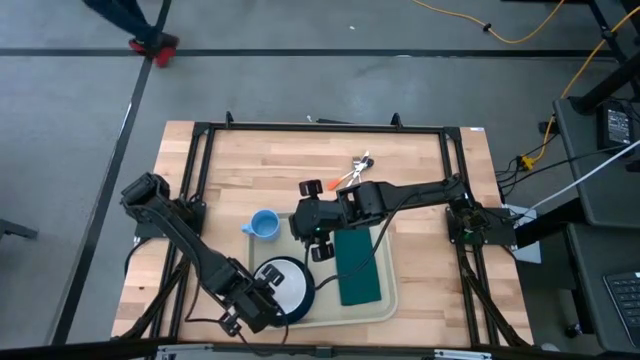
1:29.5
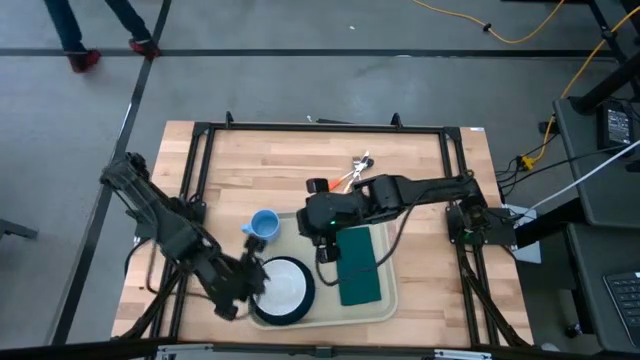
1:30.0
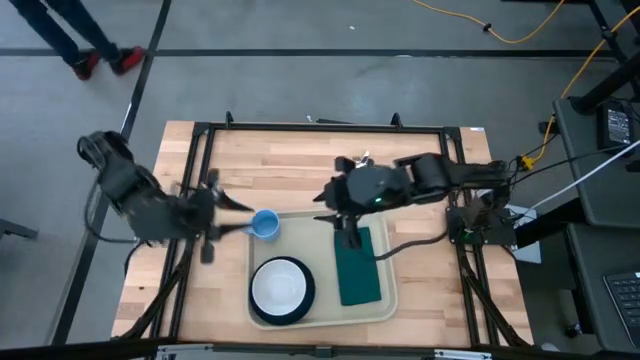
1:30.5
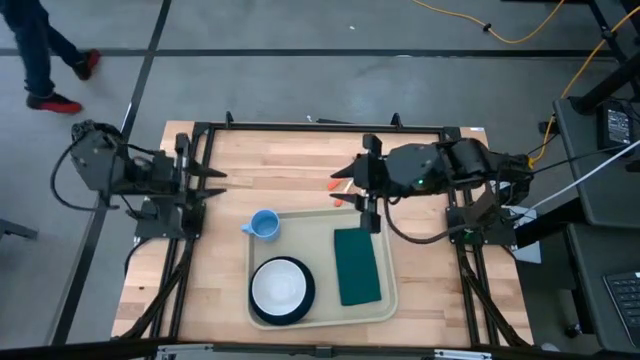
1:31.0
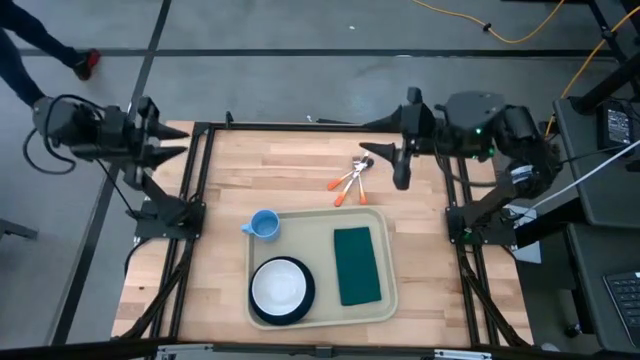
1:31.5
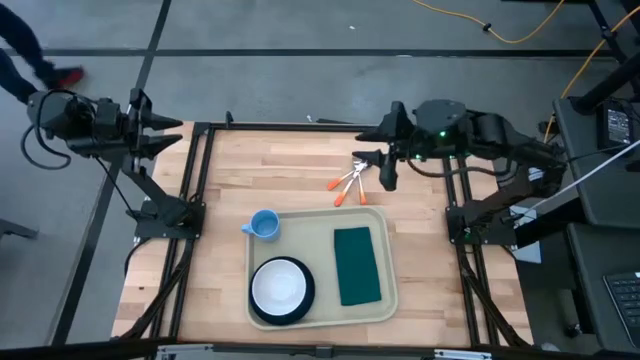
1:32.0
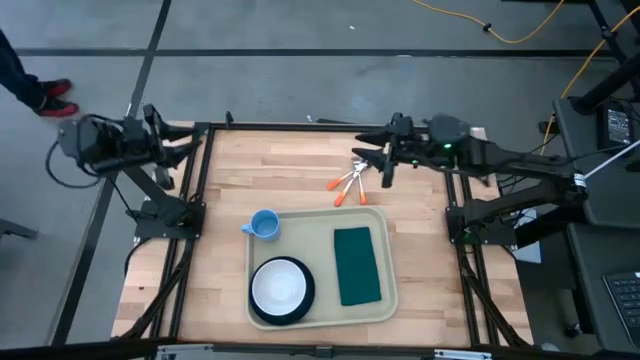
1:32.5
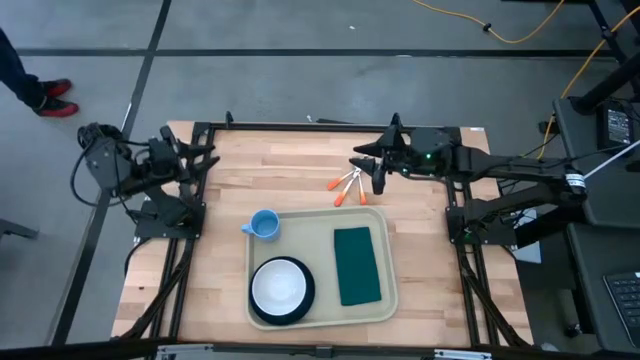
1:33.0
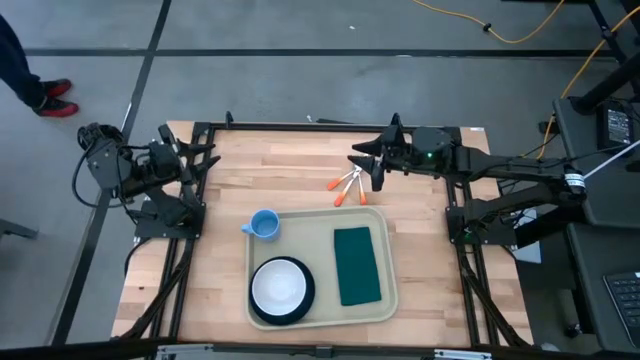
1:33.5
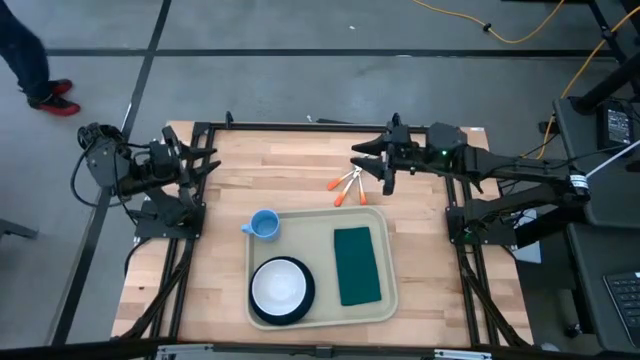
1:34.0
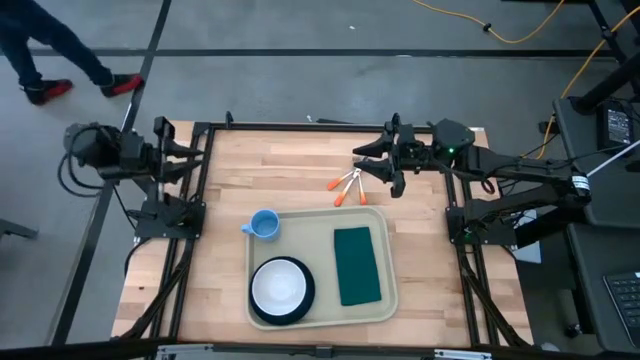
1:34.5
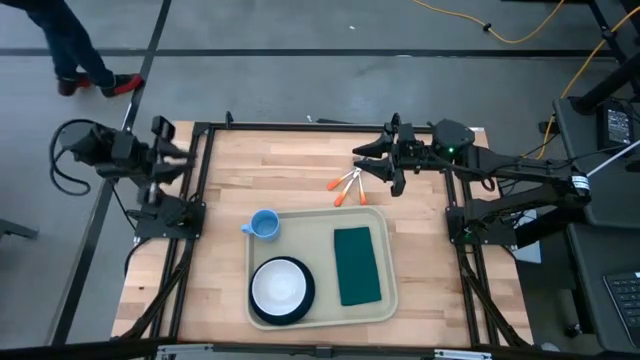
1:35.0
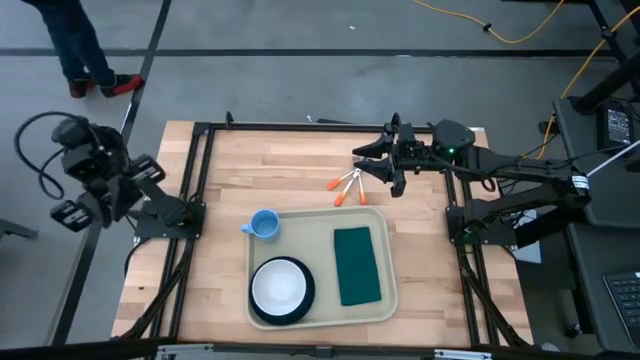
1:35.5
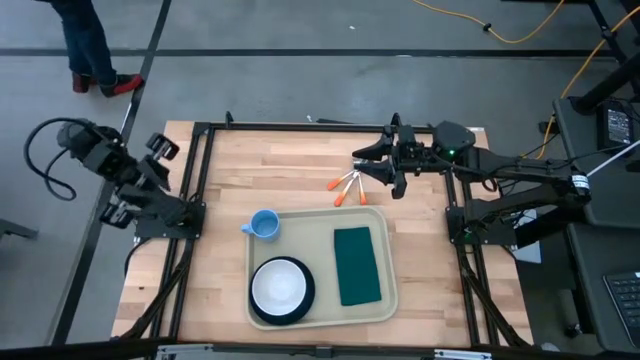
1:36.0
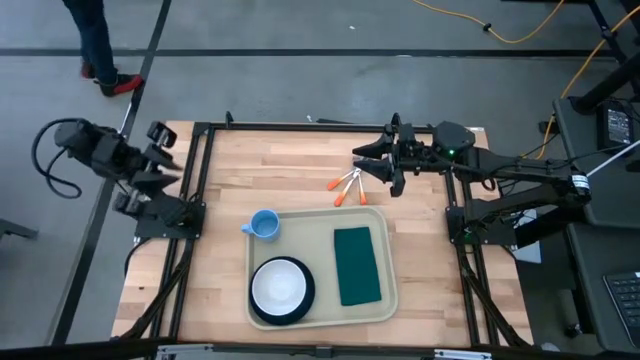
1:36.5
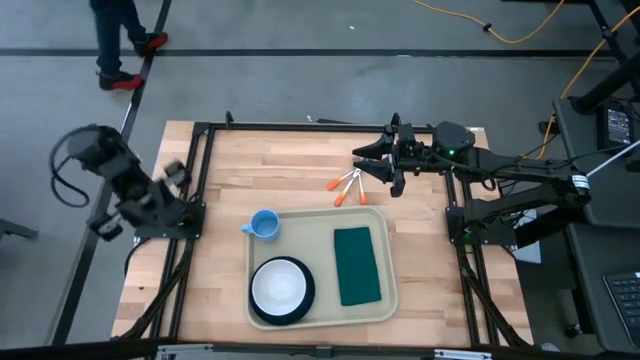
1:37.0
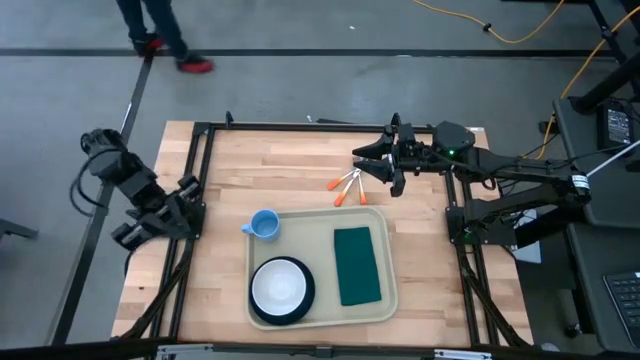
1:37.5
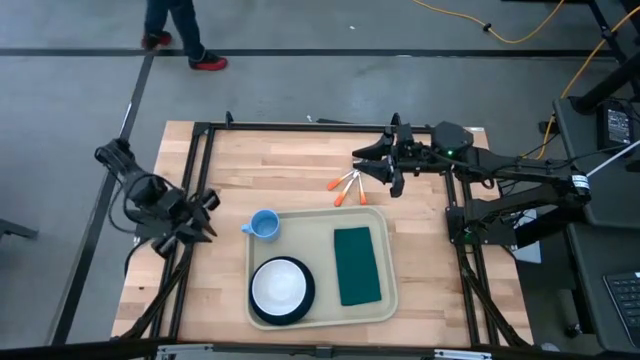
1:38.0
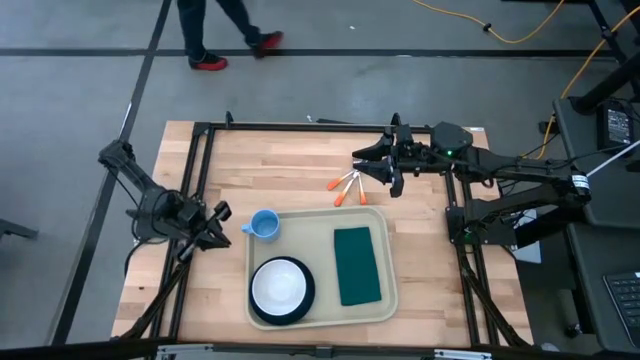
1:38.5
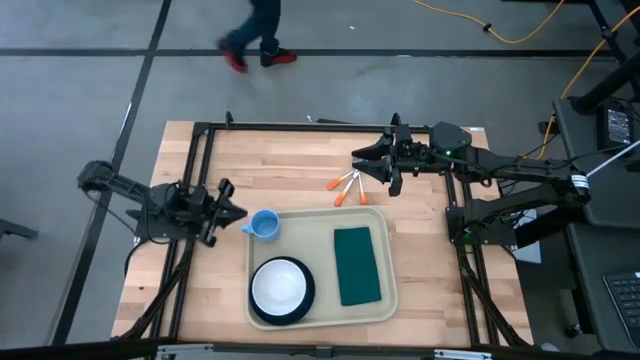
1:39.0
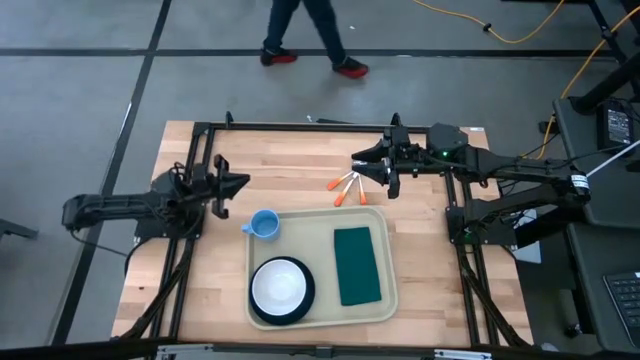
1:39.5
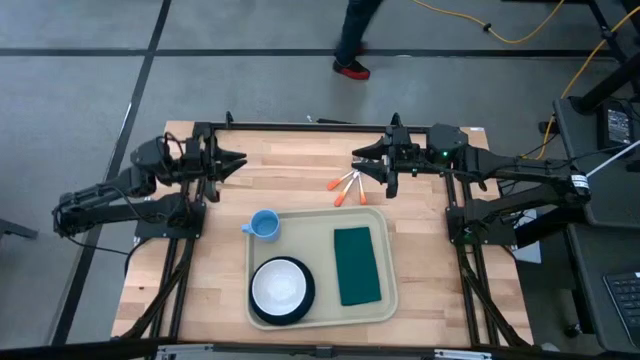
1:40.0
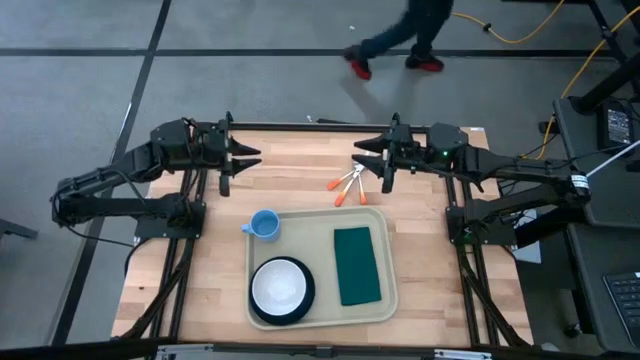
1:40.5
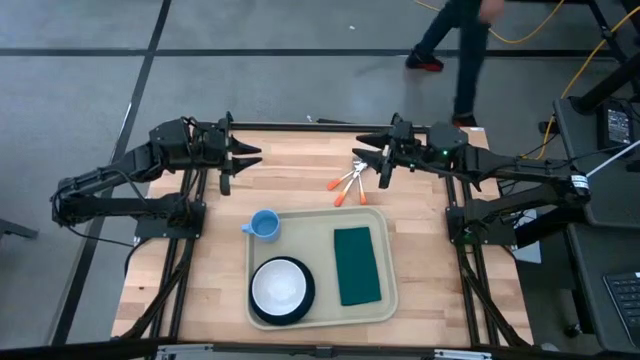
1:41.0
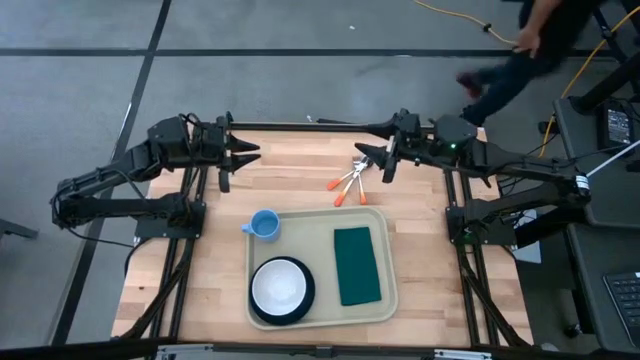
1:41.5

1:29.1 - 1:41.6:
Task: Set up tray
Put the orange knife on top of the green napkin

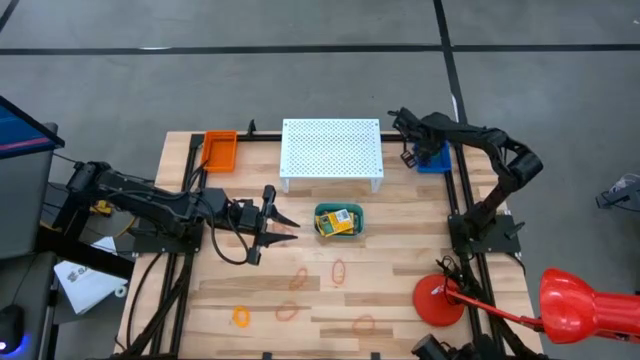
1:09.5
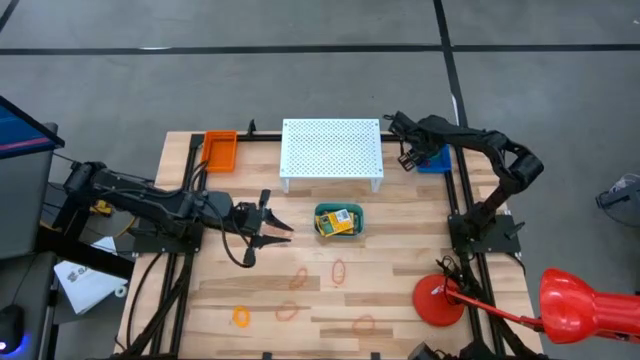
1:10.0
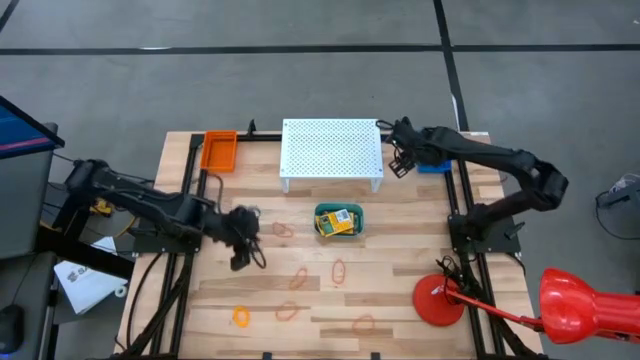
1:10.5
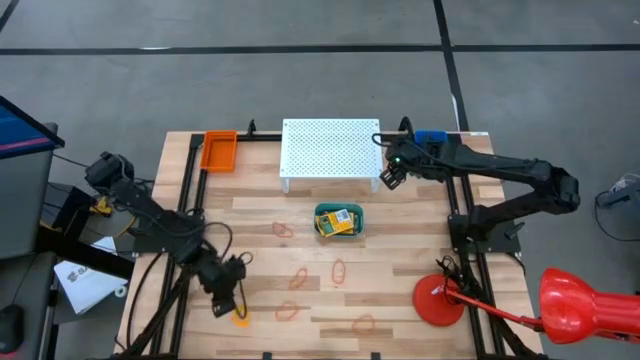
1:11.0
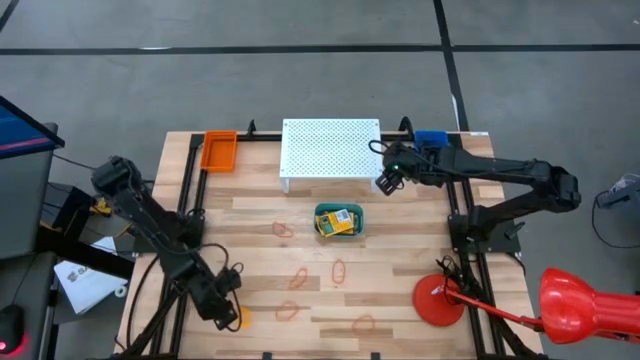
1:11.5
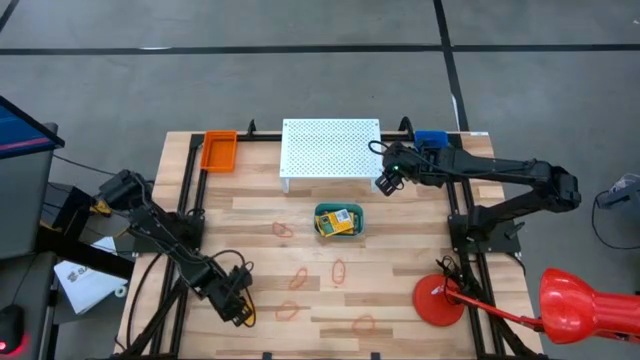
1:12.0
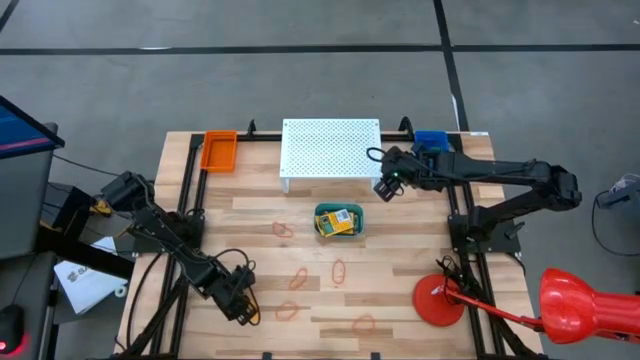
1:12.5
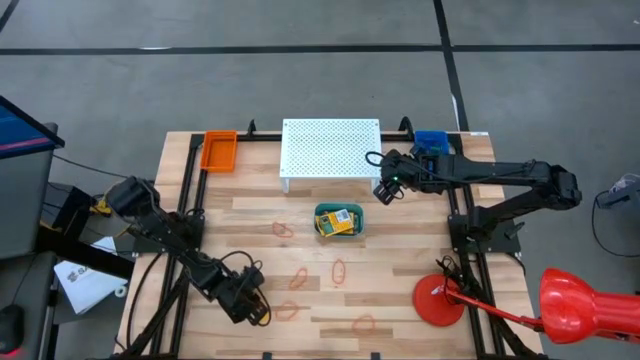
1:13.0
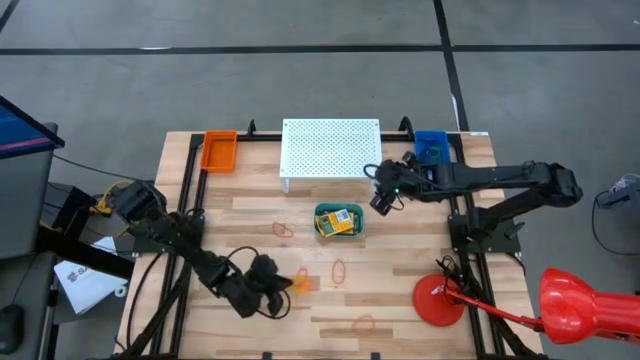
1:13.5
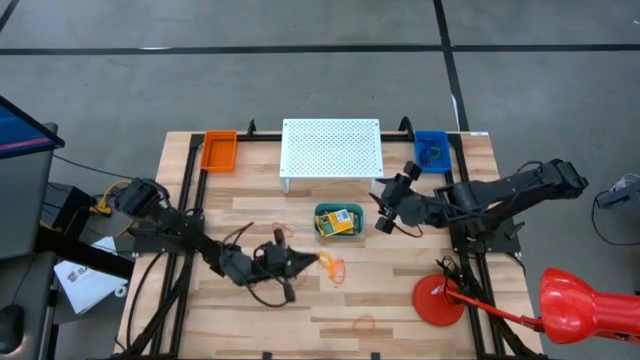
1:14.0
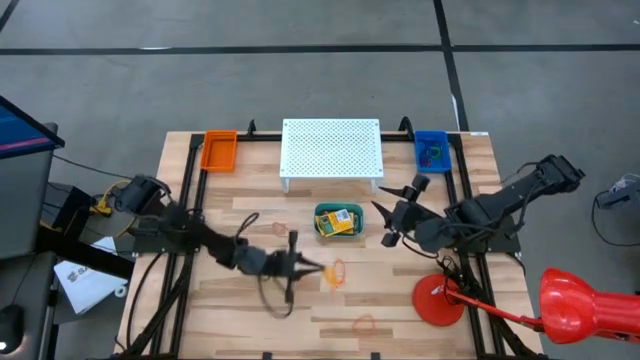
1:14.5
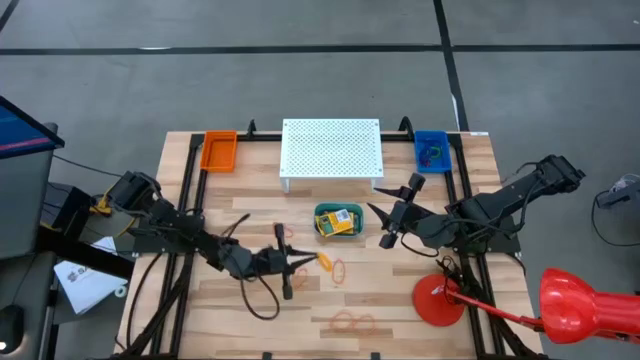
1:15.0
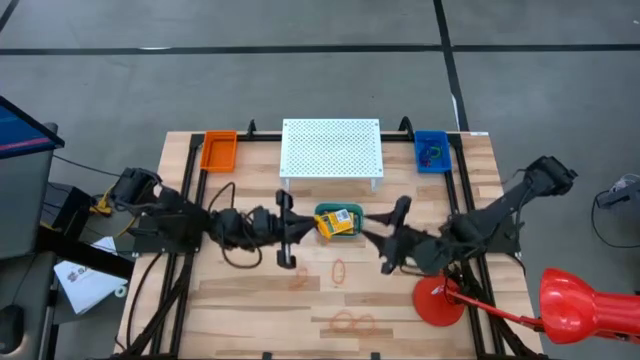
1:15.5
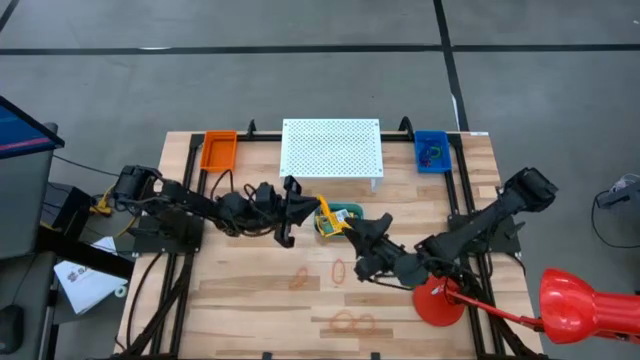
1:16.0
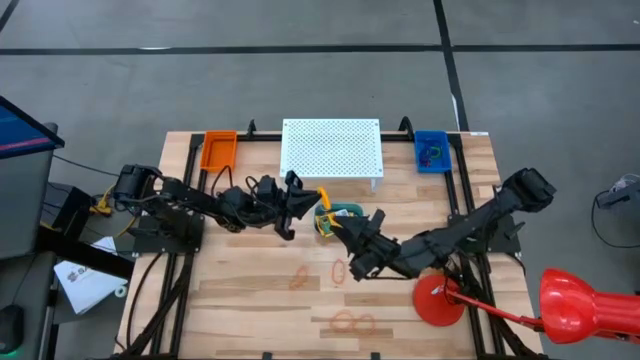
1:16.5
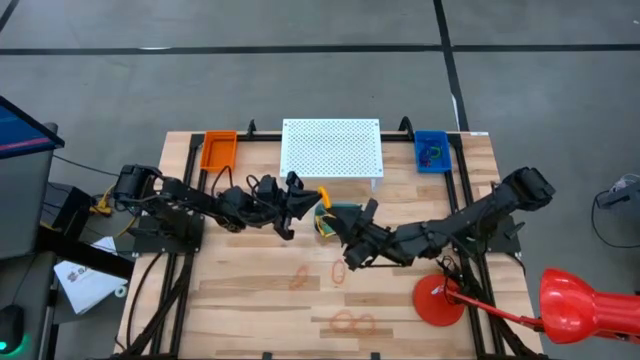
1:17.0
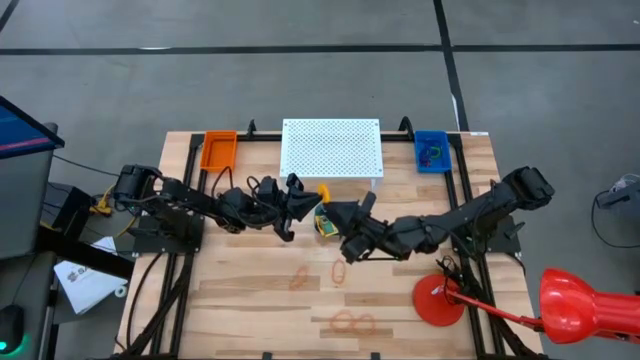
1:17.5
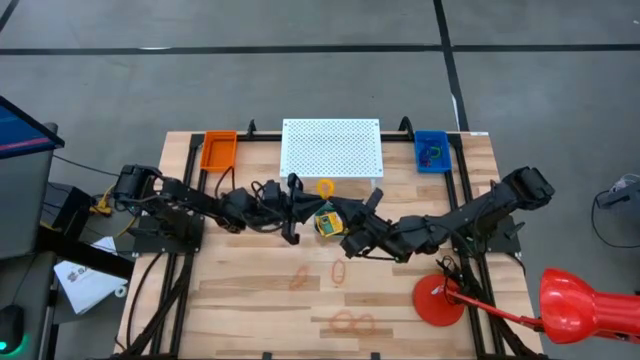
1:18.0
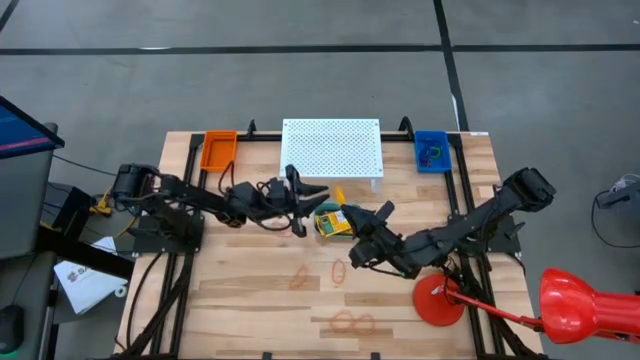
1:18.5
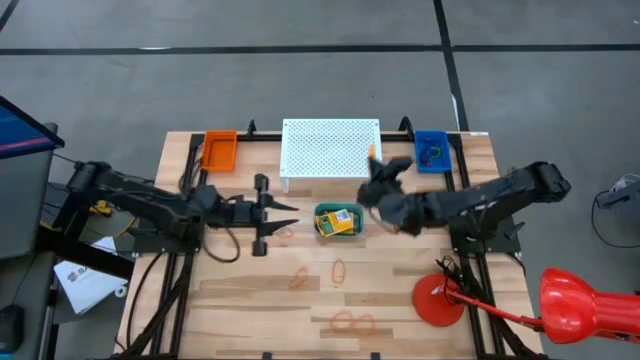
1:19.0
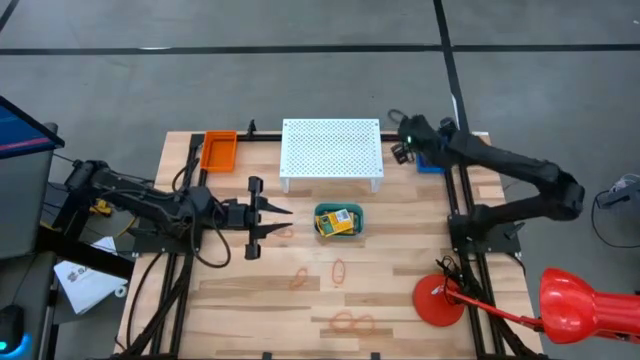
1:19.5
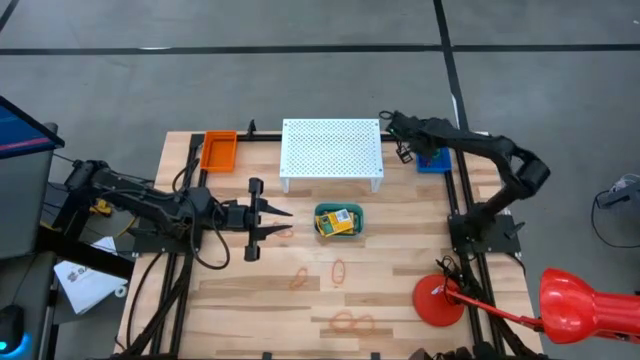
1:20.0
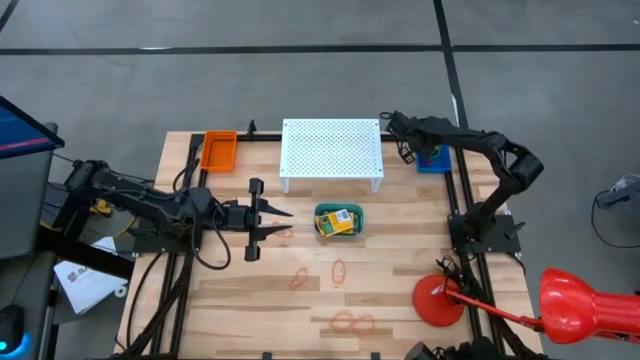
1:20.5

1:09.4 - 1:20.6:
Task: Pick & Place Office Desk Supplies
Put the yellow keychain into the blue bin
